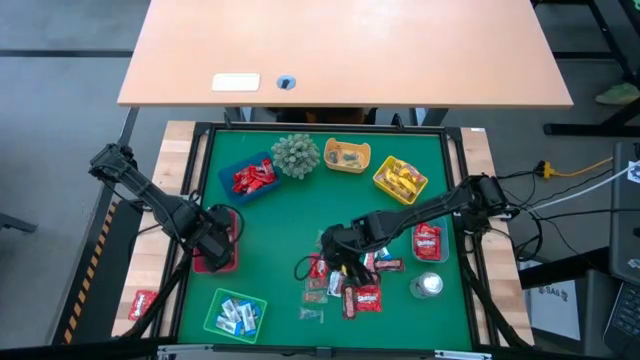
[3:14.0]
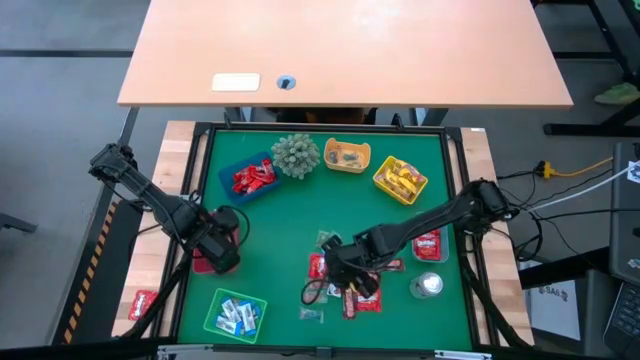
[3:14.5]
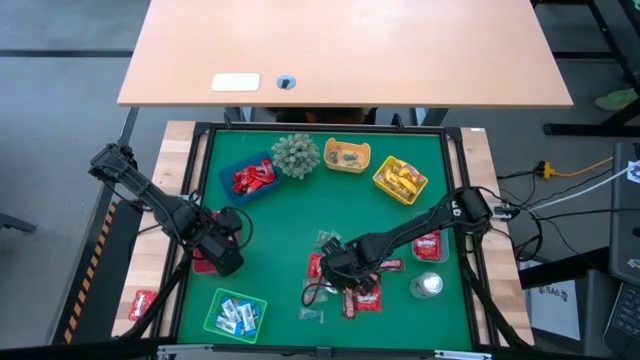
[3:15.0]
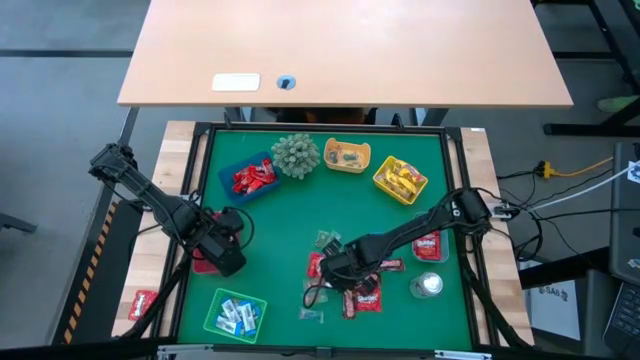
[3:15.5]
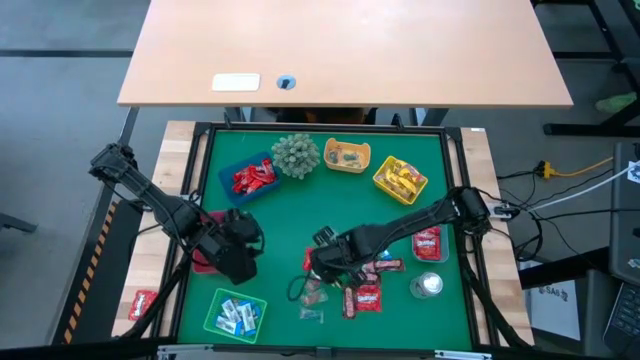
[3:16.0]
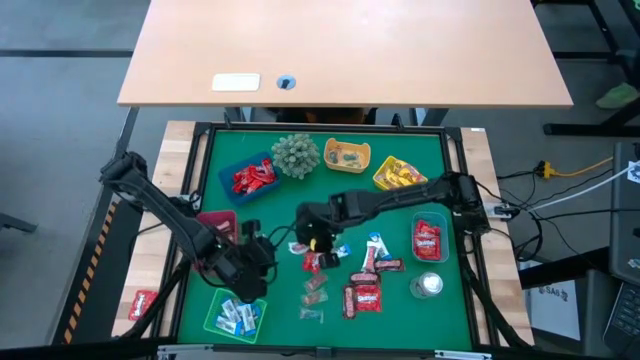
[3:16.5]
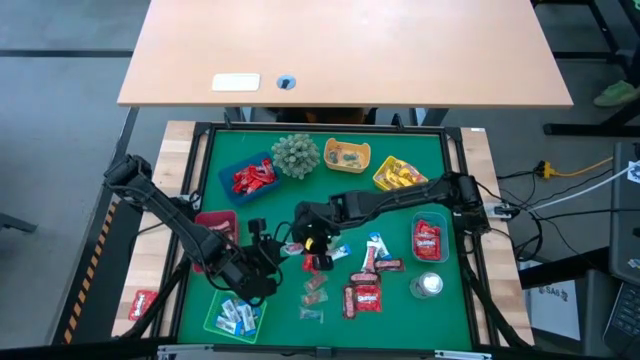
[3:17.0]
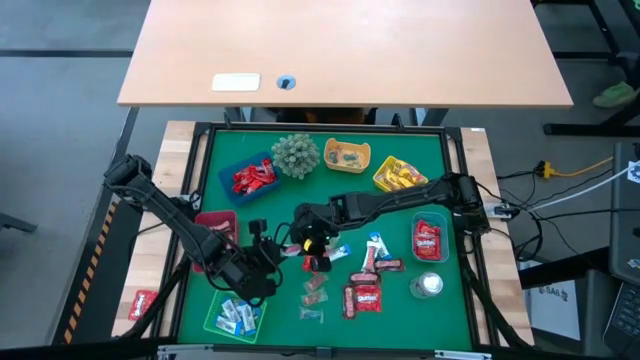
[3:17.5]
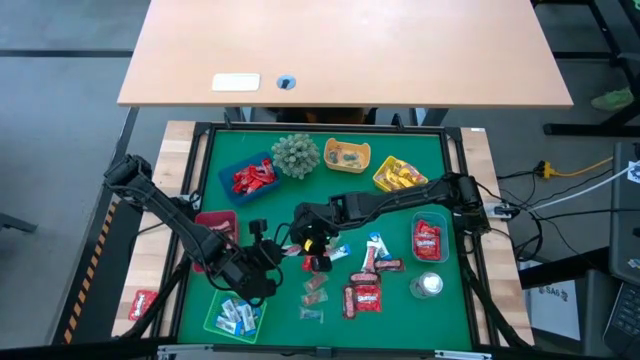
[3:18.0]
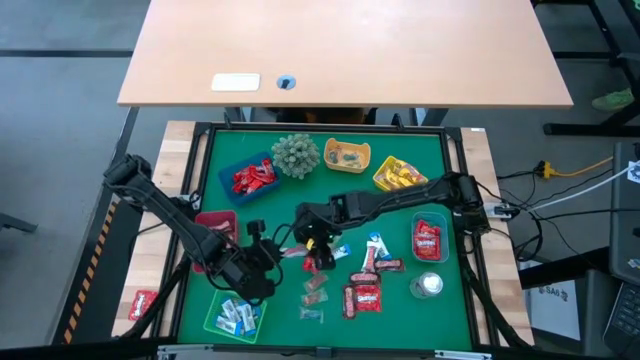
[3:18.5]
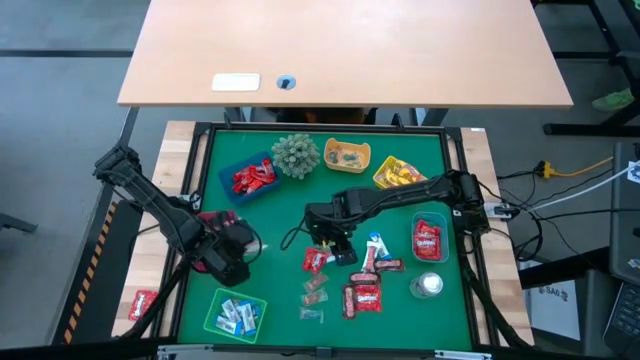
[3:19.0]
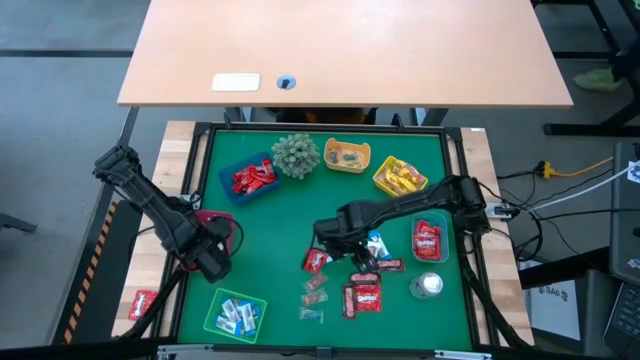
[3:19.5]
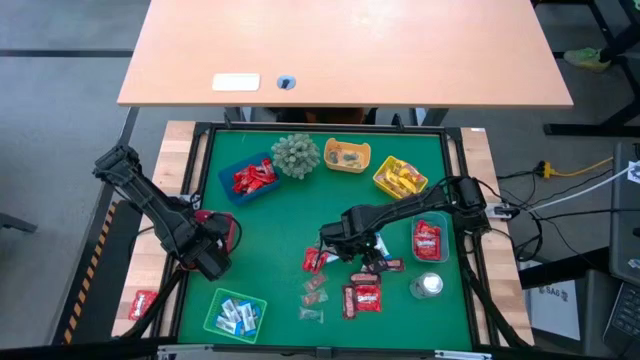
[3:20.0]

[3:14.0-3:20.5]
Task: Sort candy
Put the white-red chocolate into the red bin

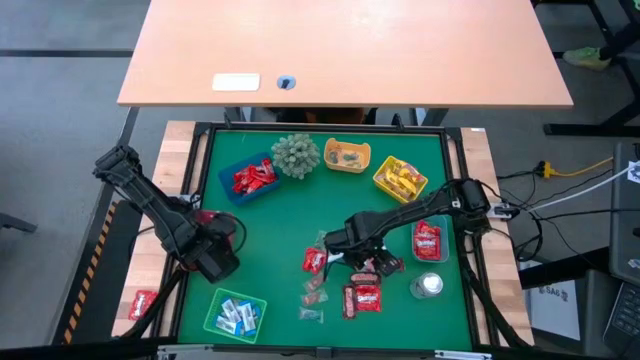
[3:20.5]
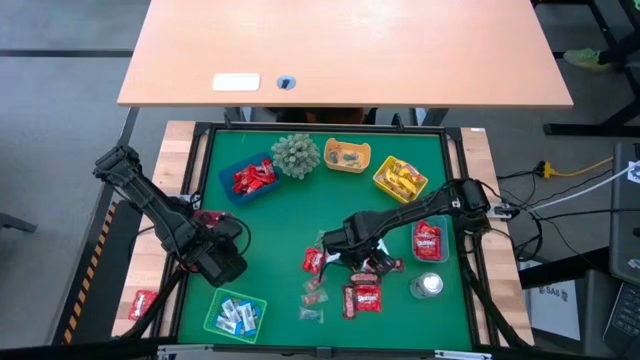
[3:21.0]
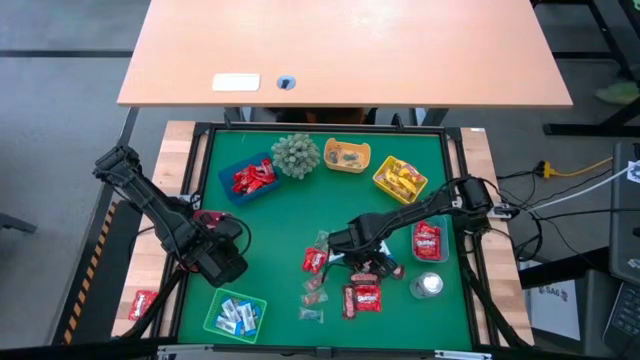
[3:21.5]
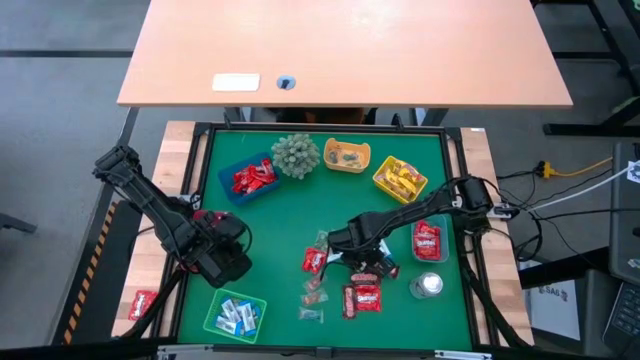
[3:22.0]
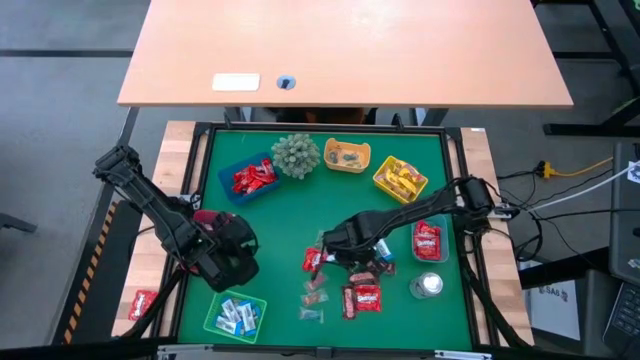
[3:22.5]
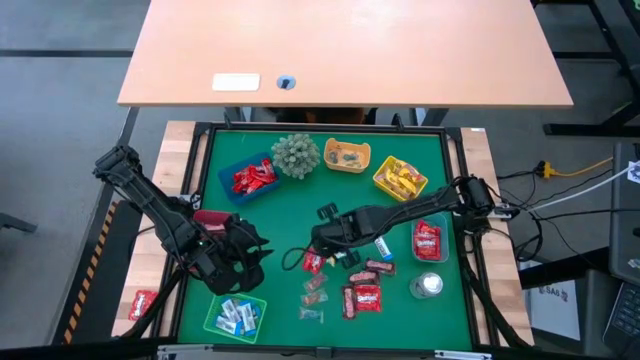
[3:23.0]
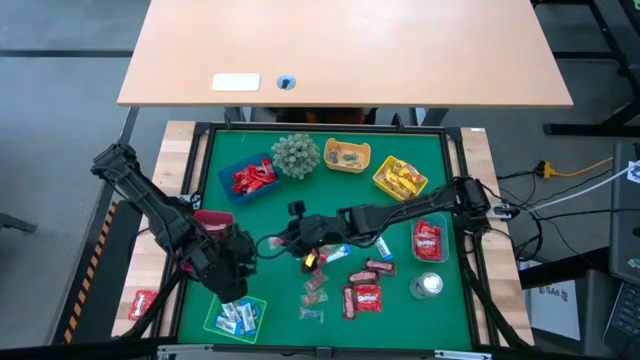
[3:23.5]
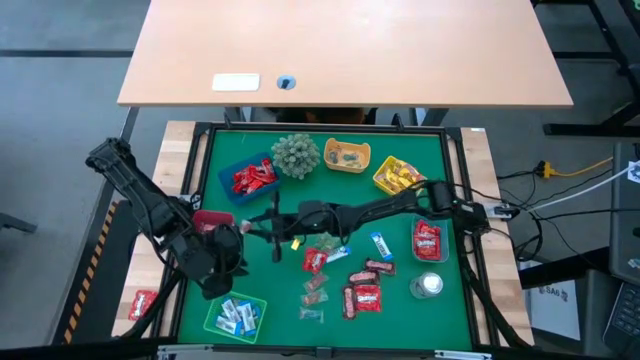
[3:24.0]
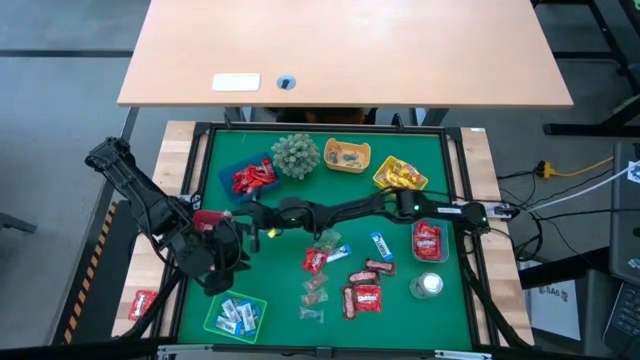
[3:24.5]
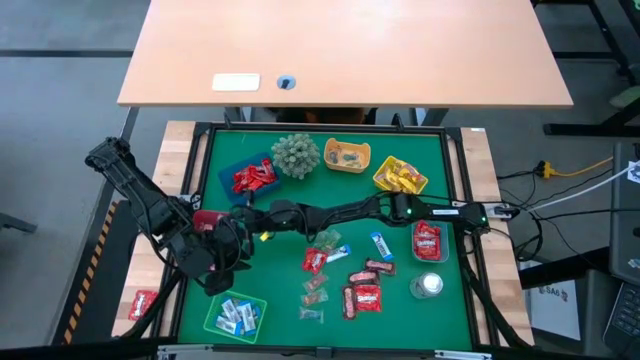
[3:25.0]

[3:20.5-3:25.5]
Put the white-red chocolate into the red bin

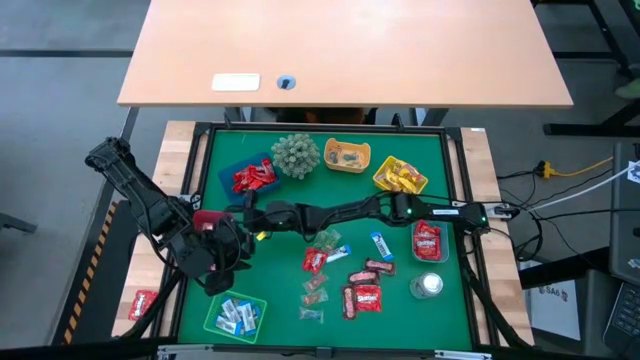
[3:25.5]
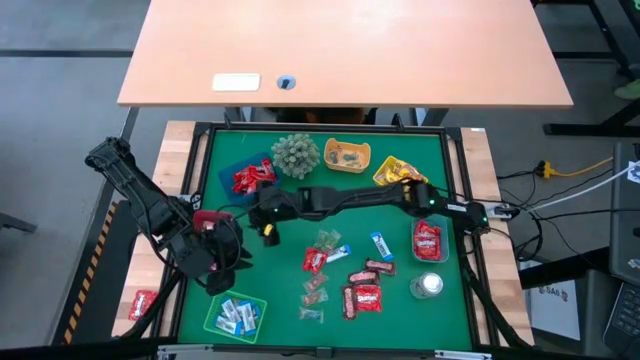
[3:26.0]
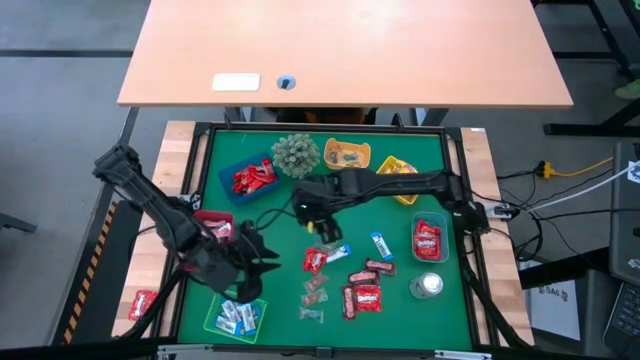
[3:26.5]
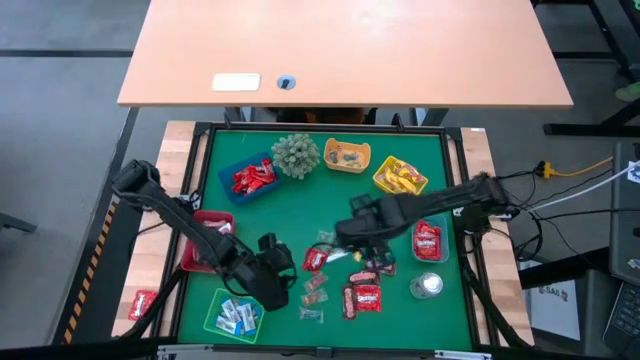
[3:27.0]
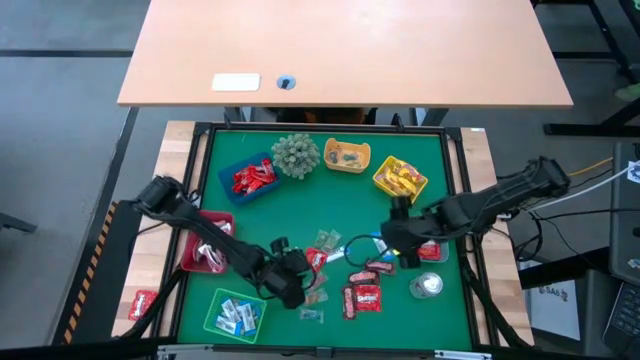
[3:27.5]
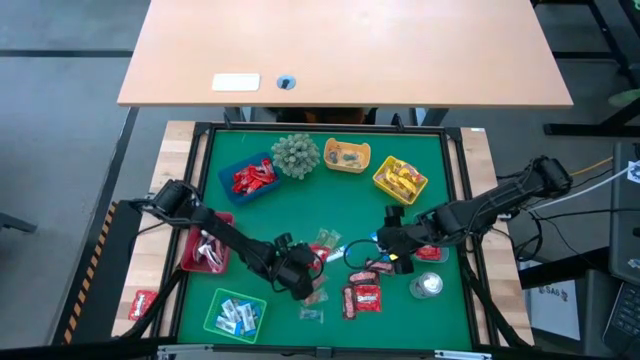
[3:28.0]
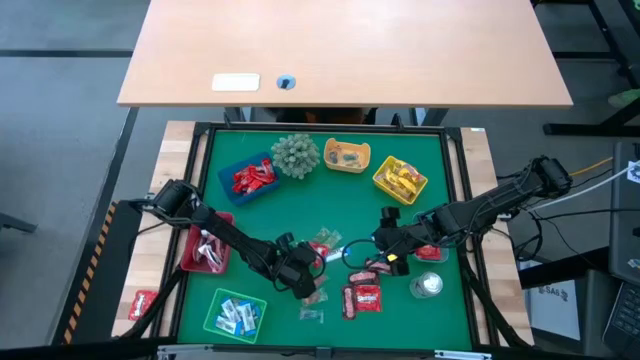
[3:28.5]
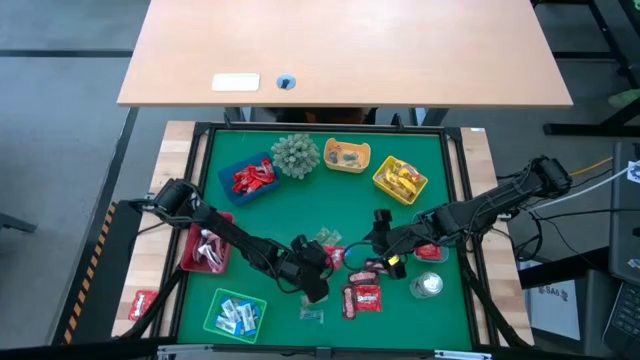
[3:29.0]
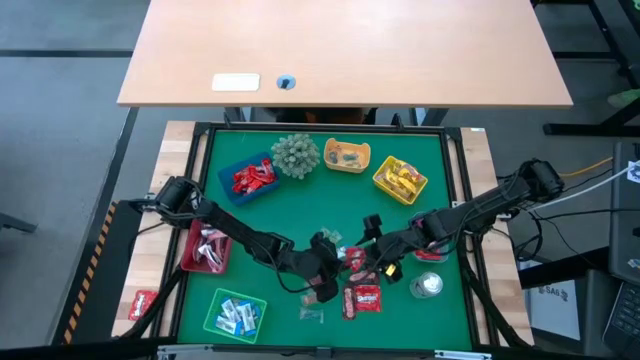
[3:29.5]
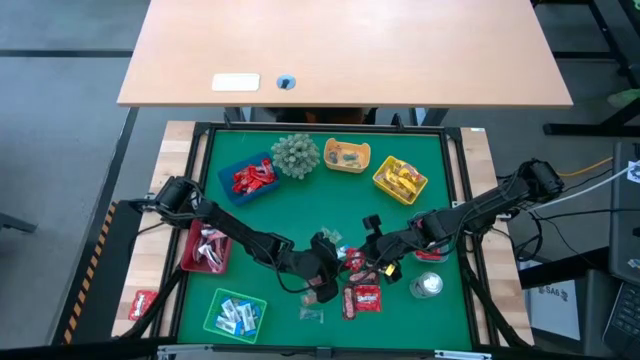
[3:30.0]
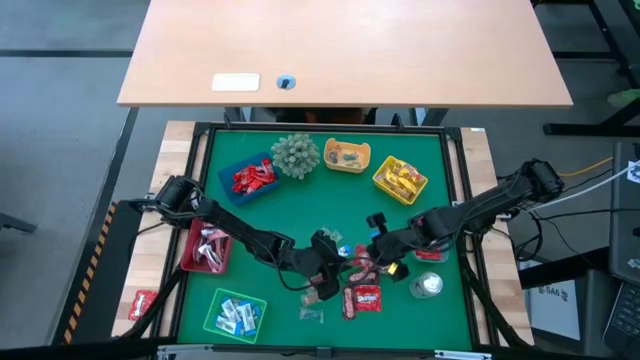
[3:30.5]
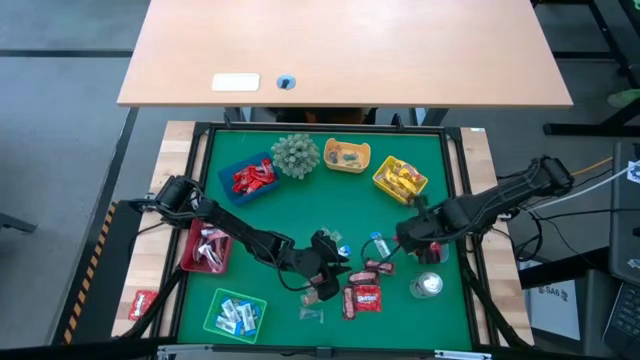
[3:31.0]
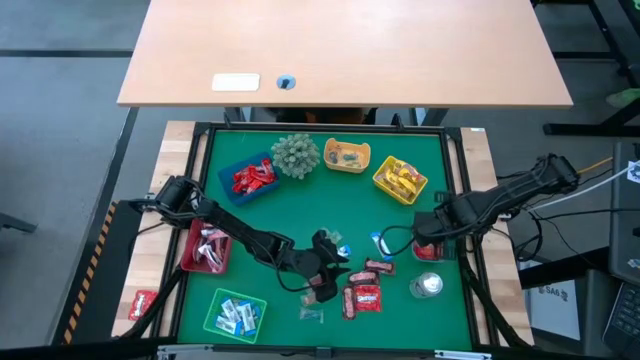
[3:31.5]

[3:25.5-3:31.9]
Put the red candy into the gray bin

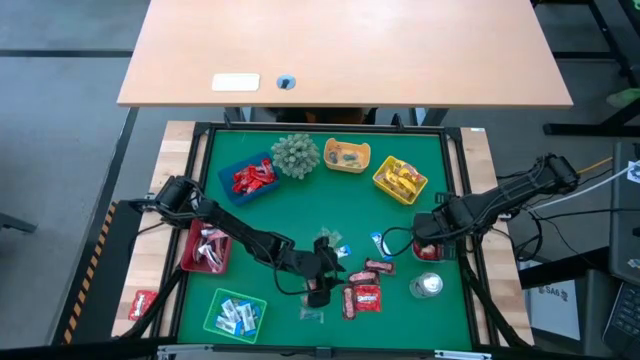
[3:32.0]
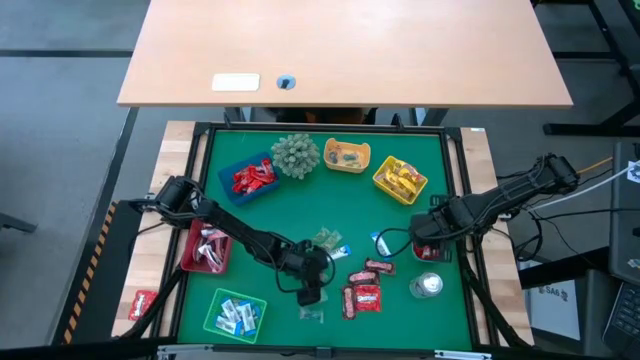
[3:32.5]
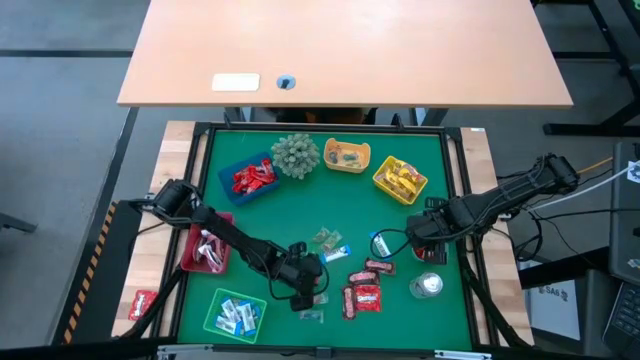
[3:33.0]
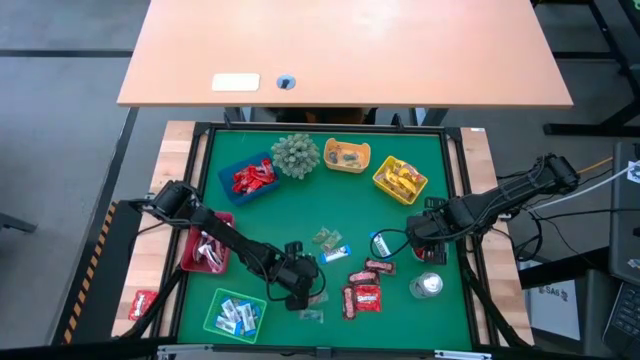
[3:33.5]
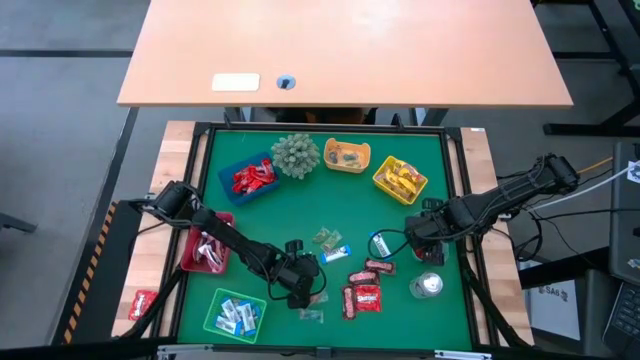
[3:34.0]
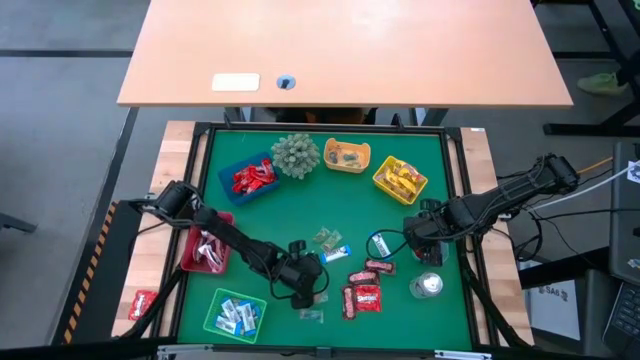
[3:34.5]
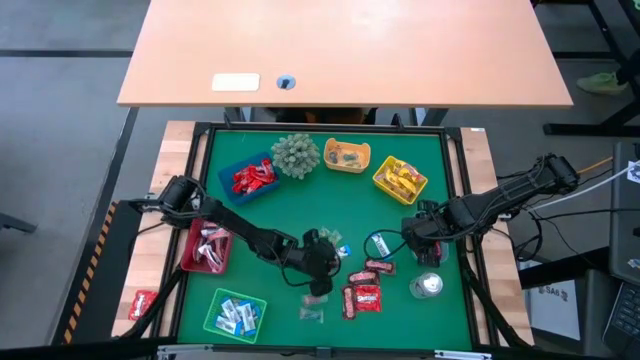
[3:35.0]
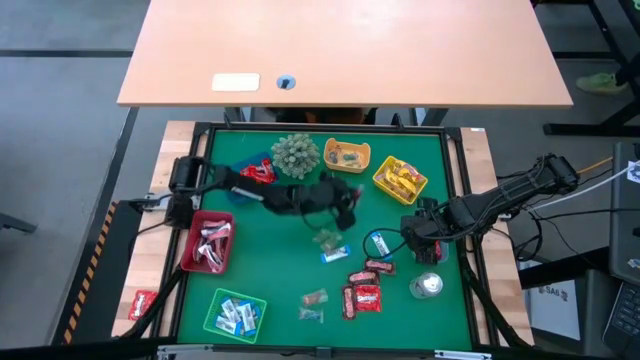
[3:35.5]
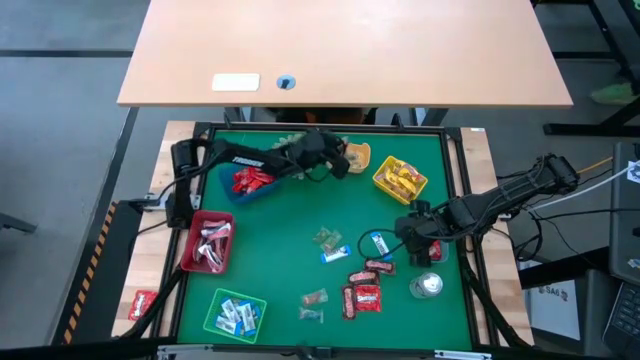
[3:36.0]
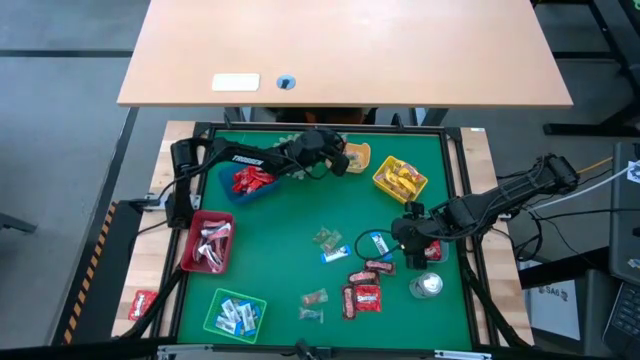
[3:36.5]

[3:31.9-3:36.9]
Put the orange gummy into the orange bin
